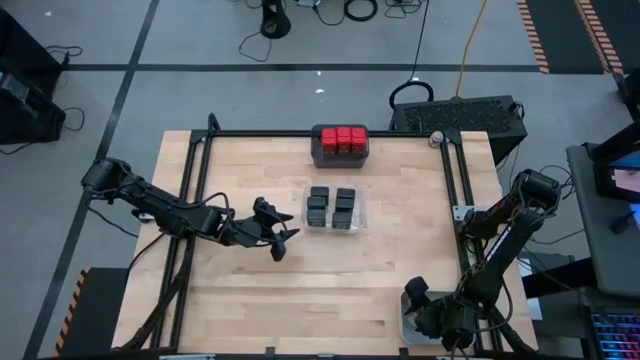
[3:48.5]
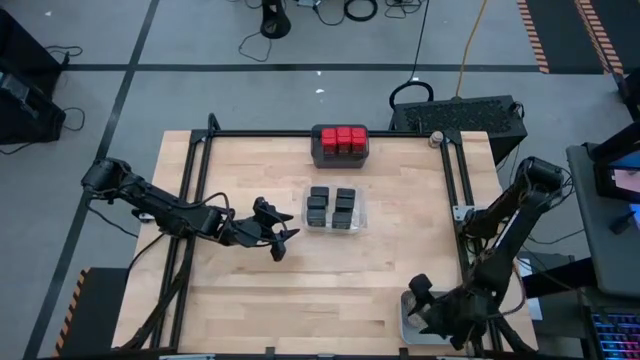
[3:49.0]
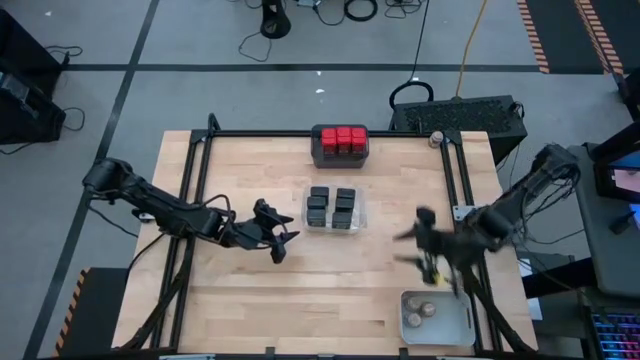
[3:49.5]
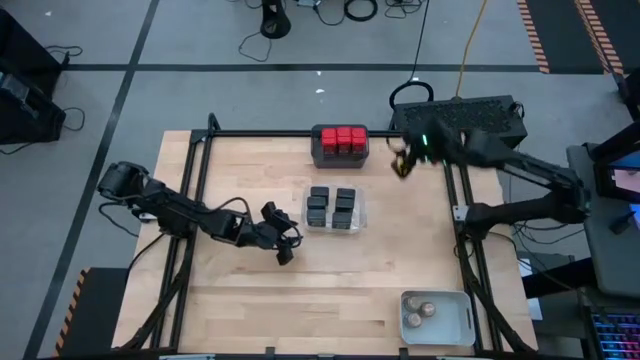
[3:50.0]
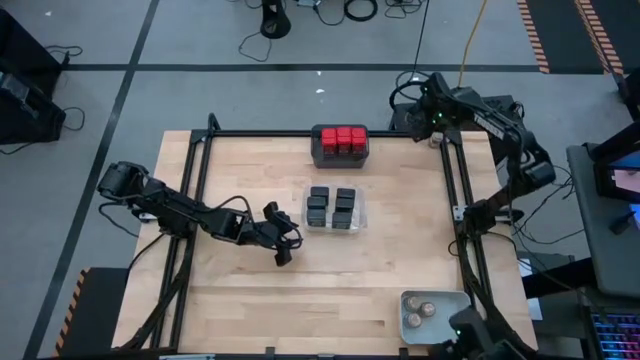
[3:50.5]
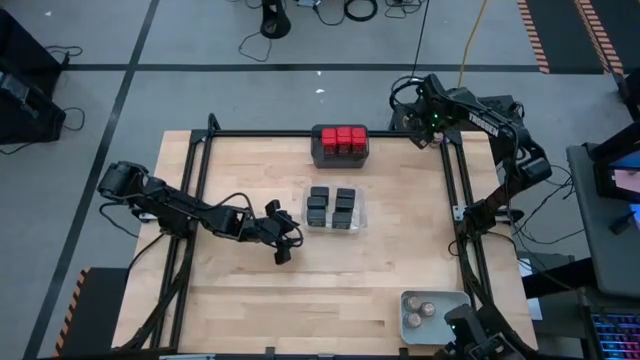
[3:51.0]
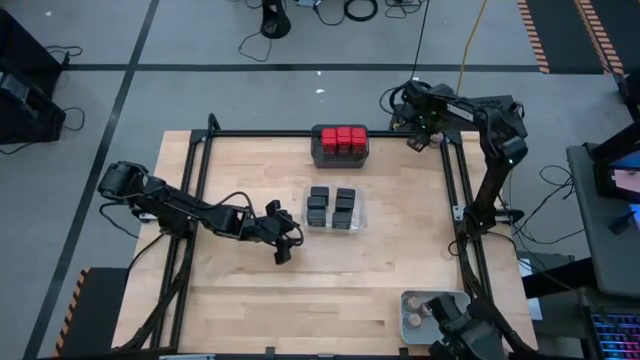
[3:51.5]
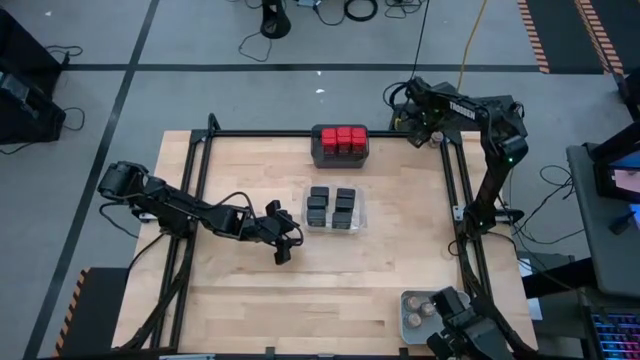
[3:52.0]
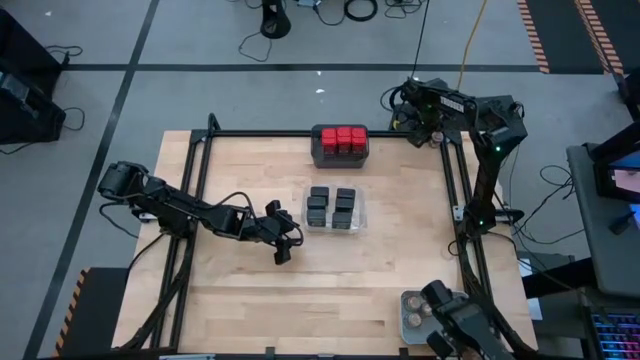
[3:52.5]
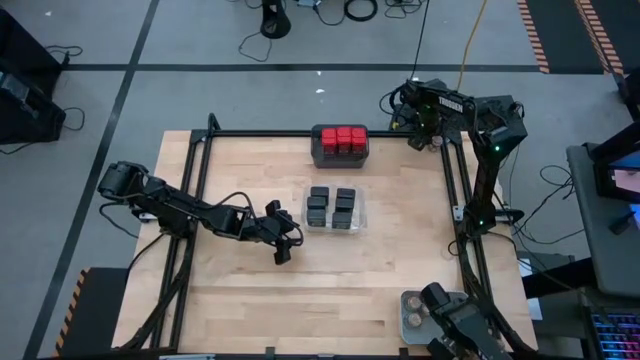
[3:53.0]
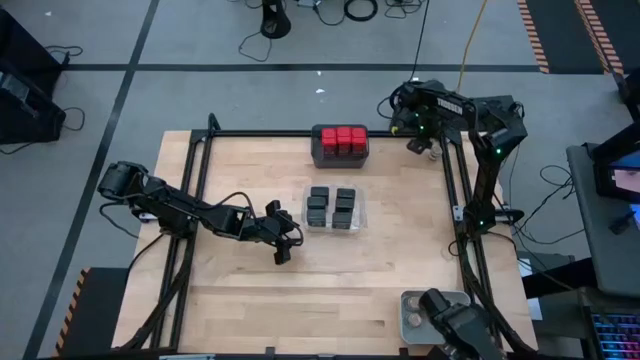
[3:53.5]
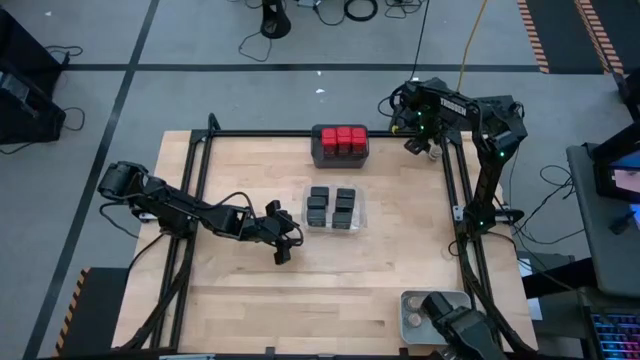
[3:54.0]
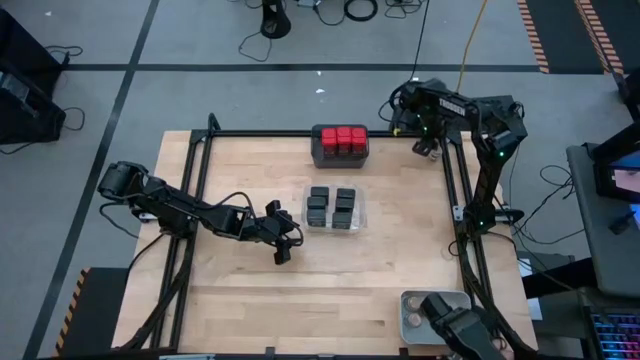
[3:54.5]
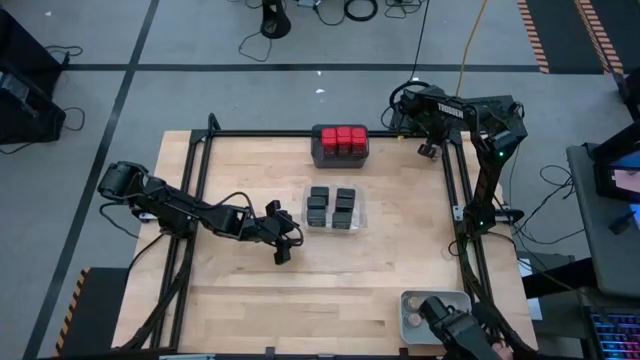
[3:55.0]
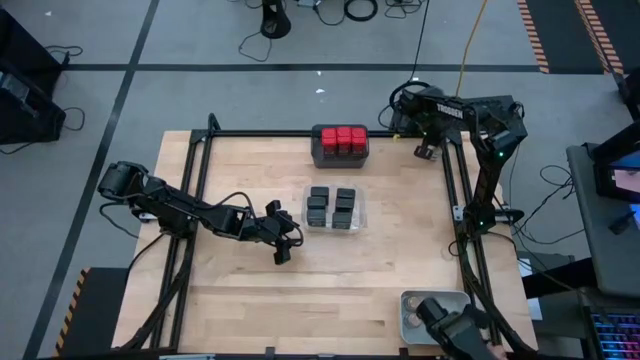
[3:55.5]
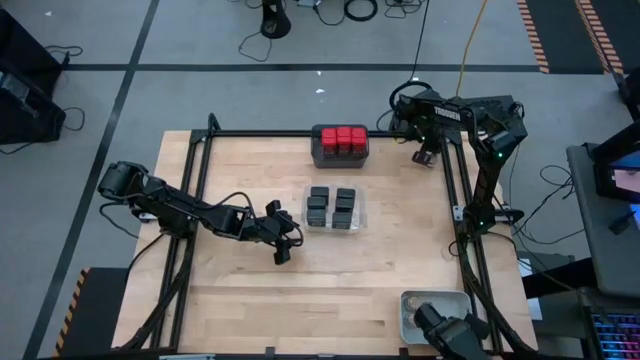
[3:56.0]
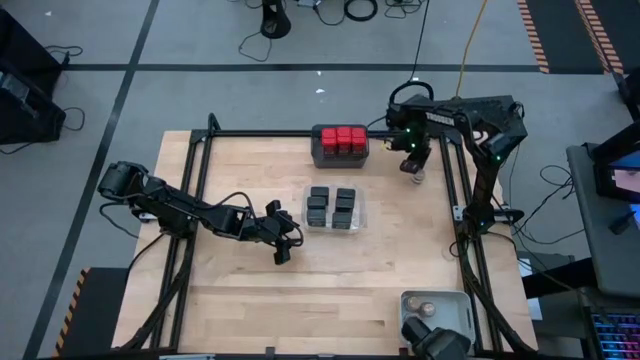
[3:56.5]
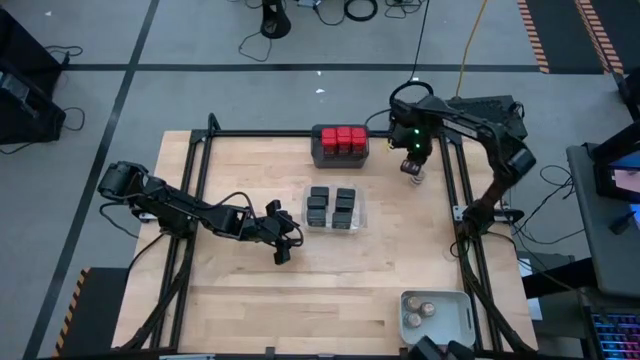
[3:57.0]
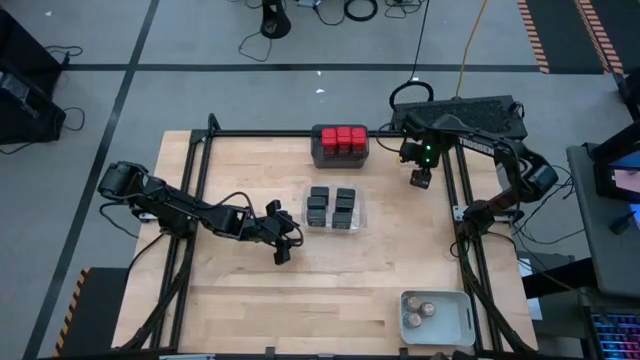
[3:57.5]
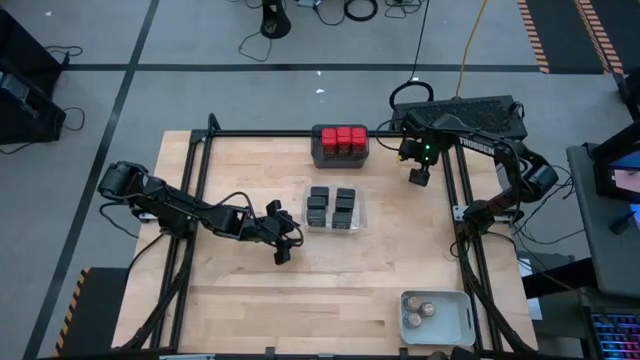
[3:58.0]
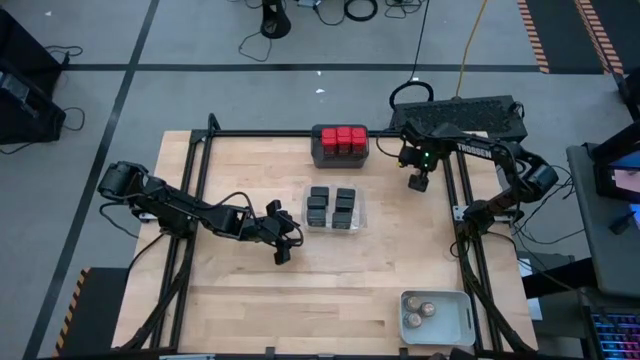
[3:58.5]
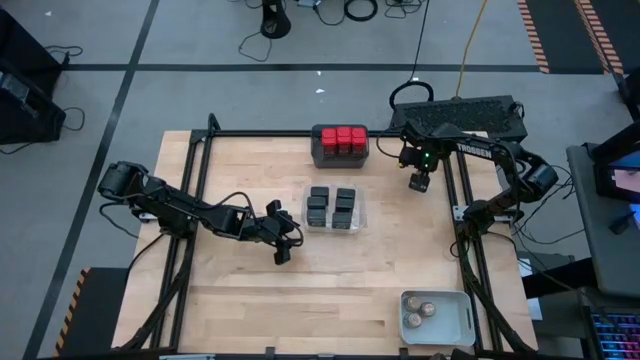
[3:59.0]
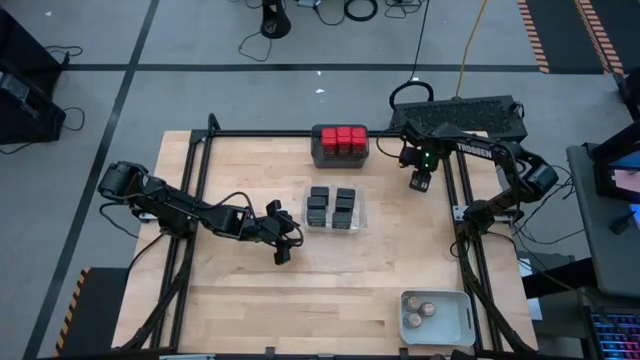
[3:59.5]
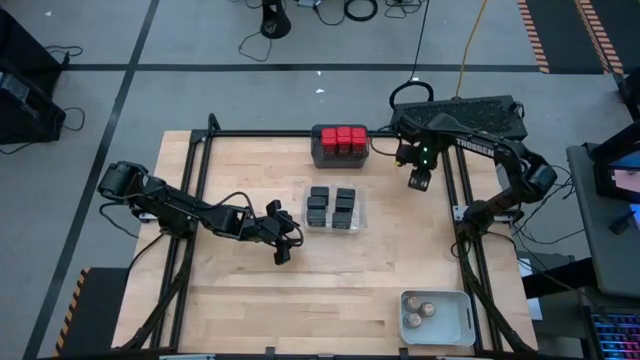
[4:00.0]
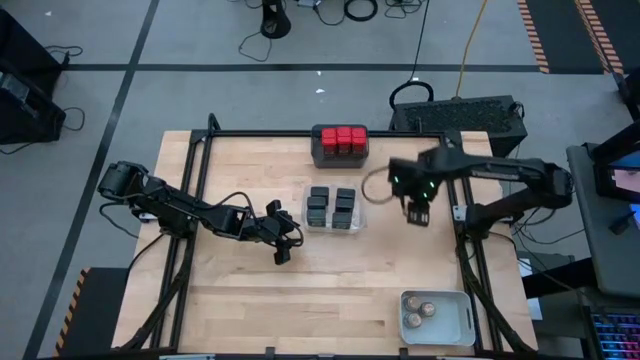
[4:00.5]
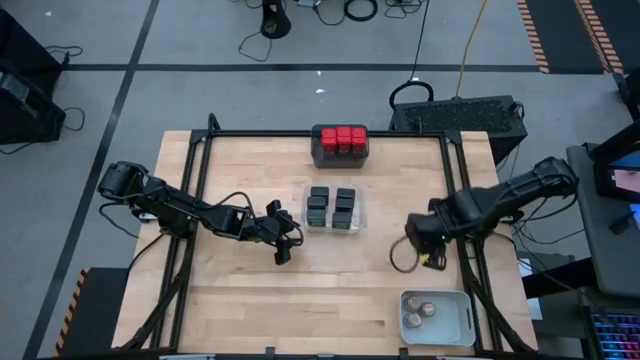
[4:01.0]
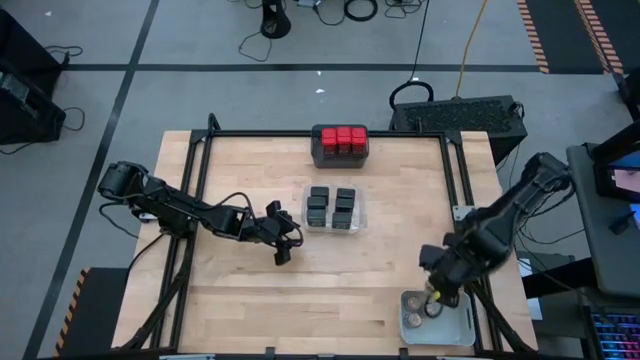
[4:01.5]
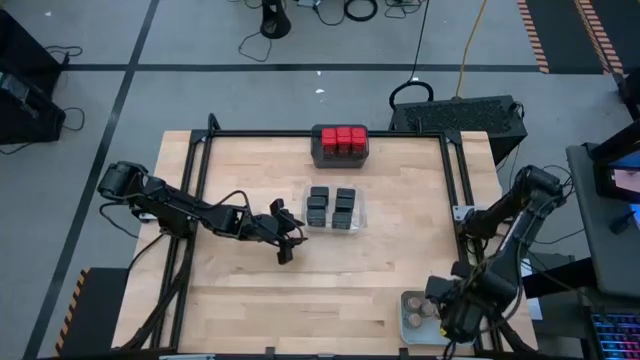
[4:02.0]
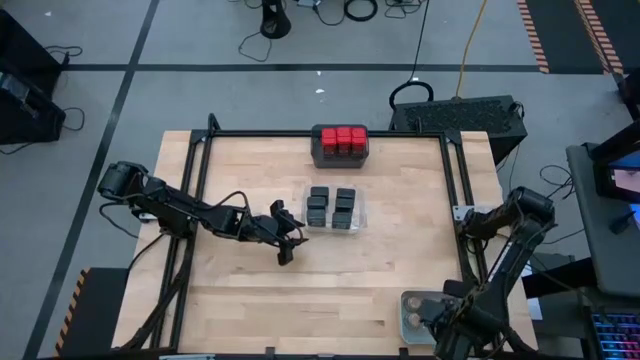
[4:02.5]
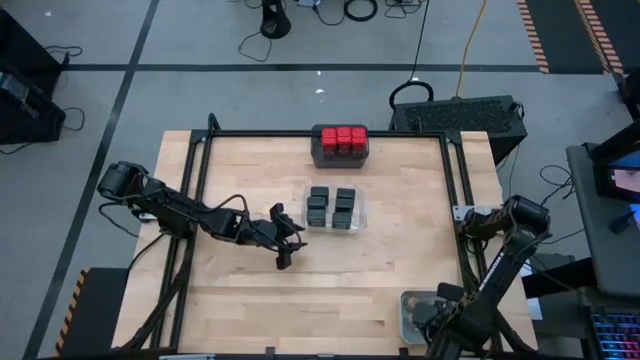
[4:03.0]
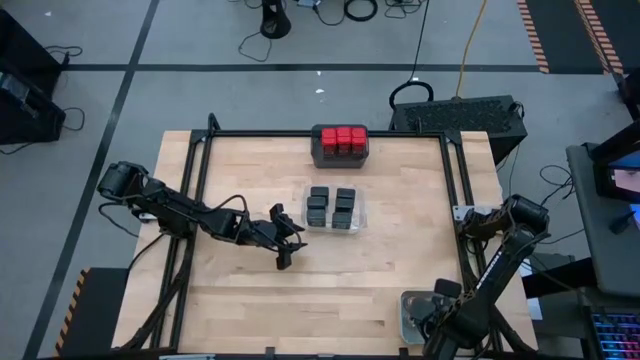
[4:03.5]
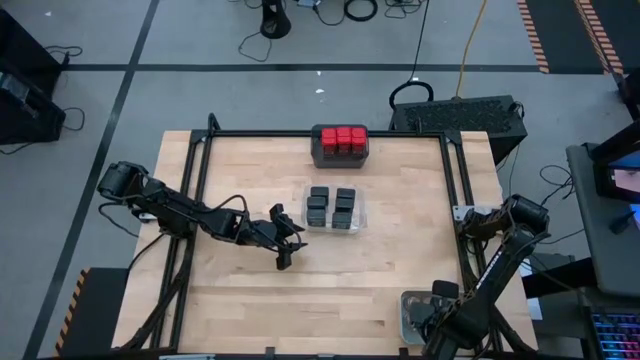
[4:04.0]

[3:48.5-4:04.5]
Task: Sort spices by type
Put the brown seasoning into the white bin

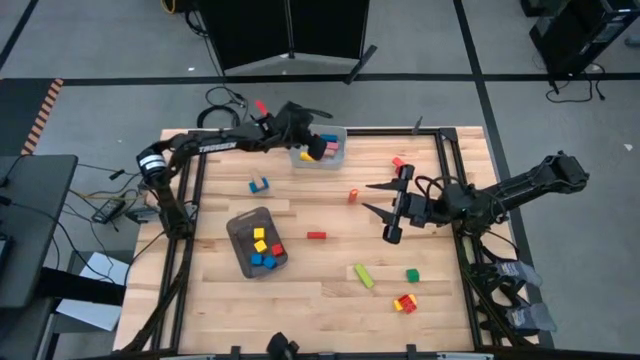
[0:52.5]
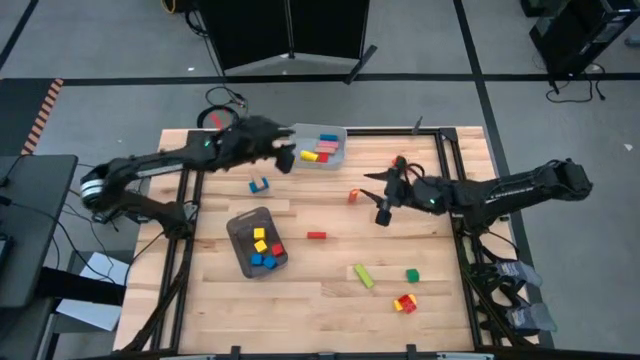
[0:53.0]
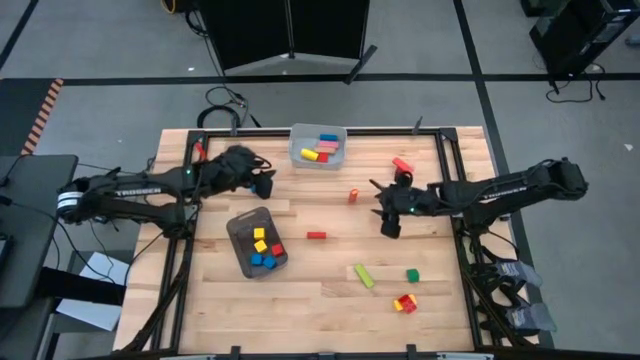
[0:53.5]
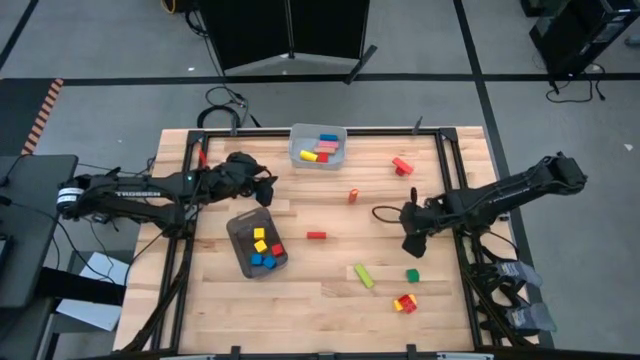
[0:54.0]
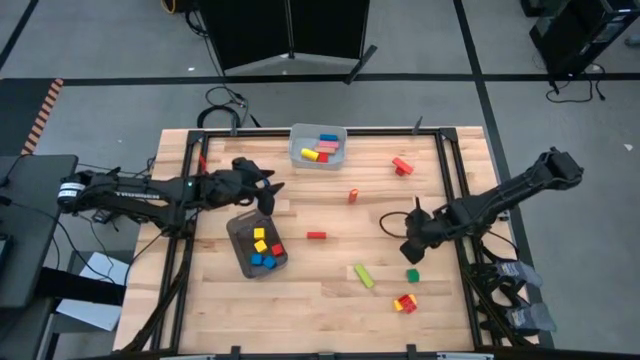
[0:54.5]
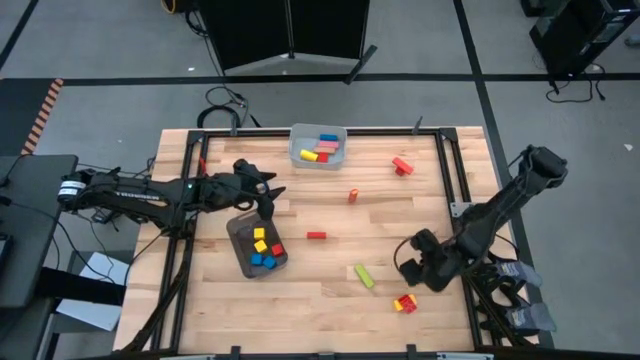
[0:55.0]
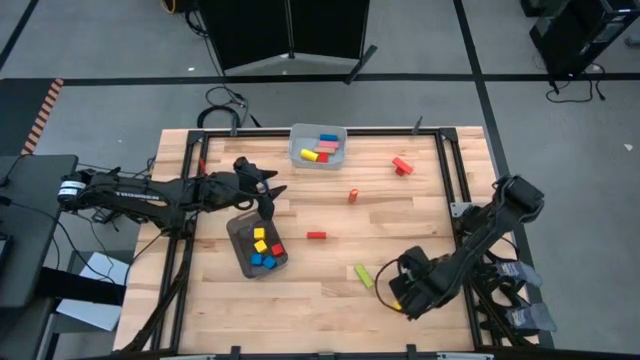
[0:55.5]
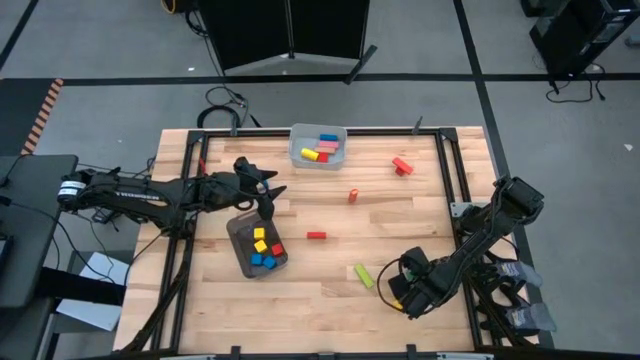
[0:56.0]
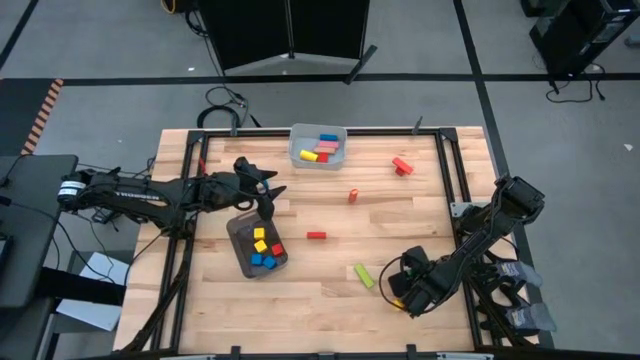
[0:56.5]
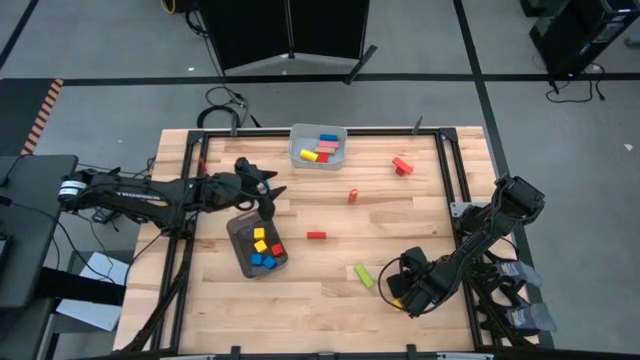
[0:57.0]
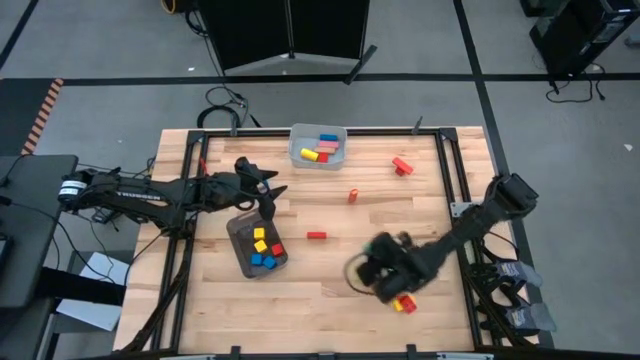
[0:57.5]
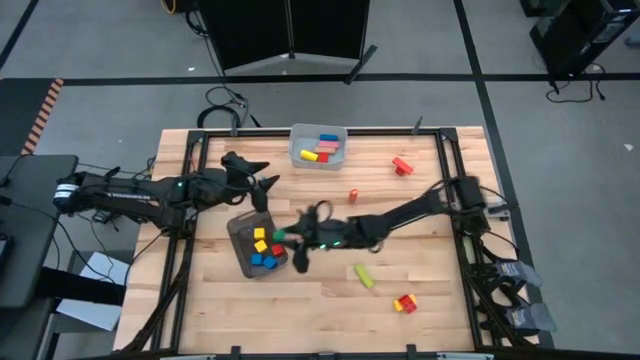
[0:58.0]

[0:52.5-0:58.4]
Task: Sort blocks by size
Put the green triangle block into the black bin
